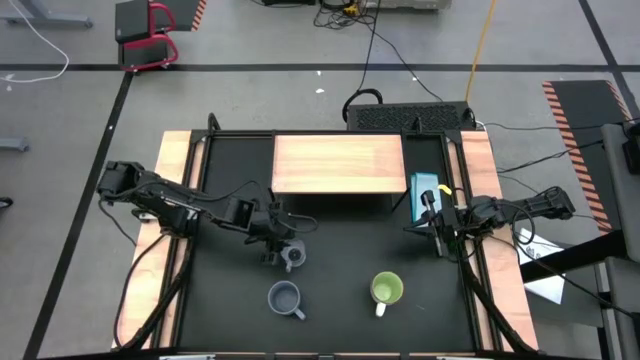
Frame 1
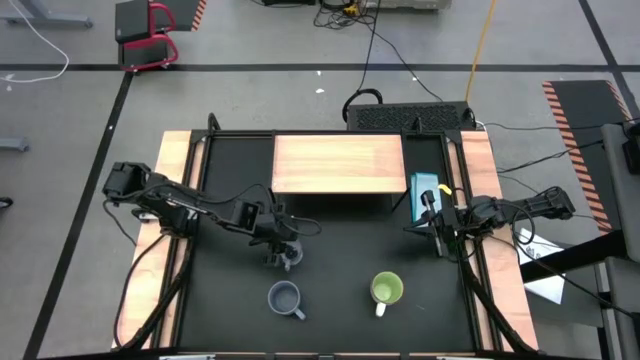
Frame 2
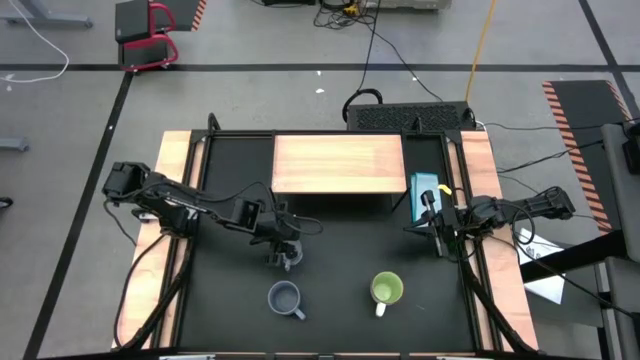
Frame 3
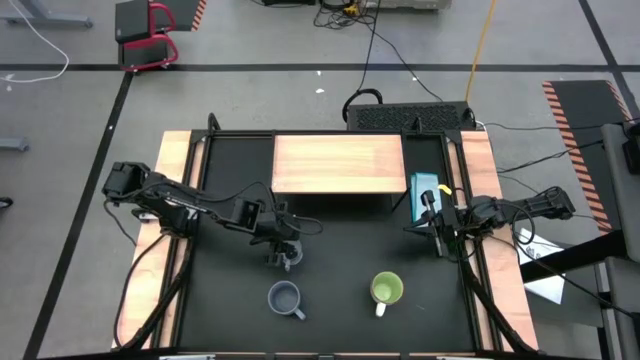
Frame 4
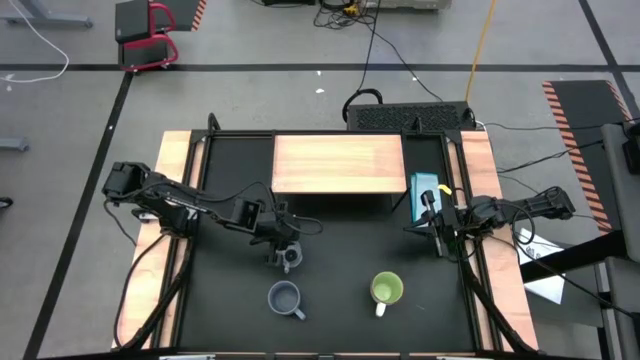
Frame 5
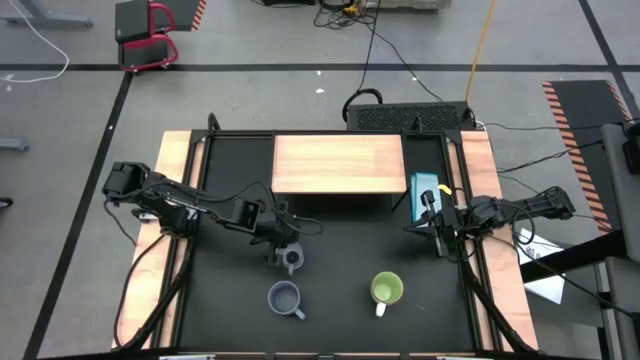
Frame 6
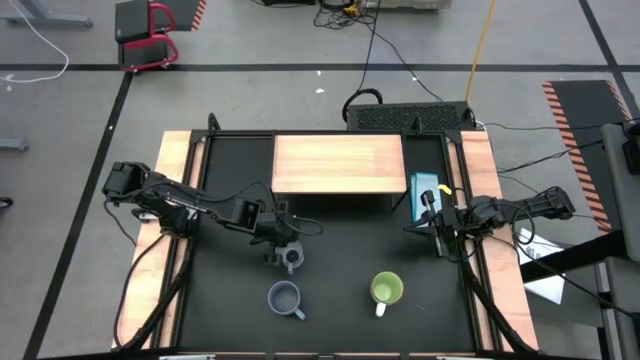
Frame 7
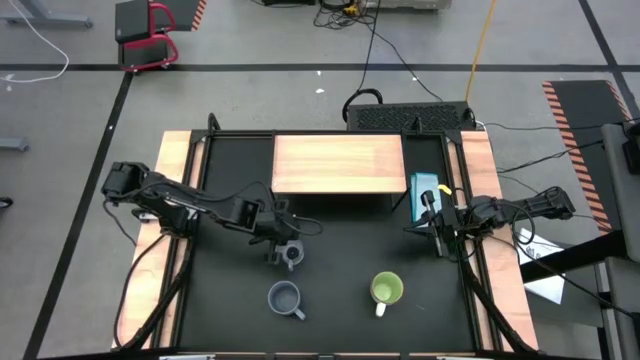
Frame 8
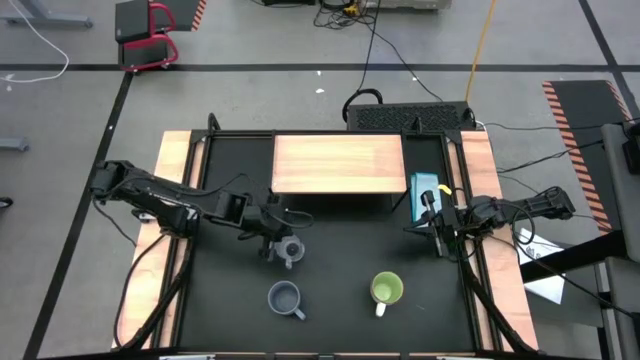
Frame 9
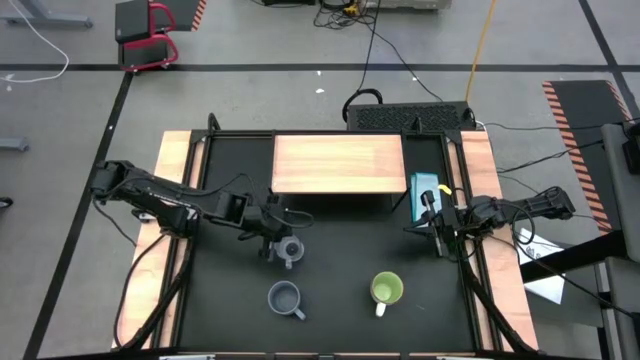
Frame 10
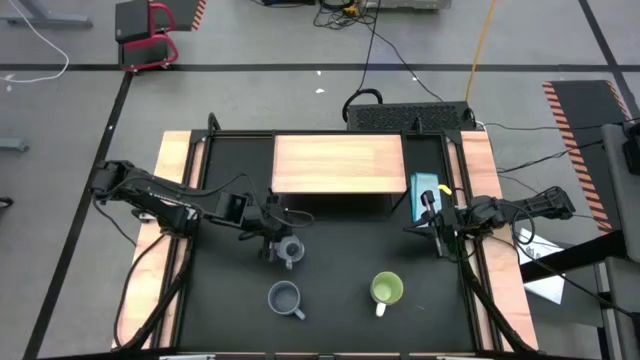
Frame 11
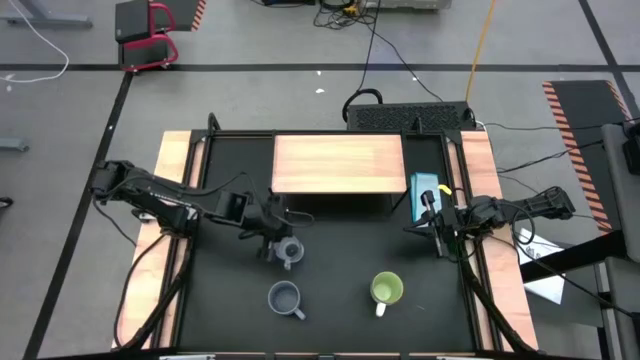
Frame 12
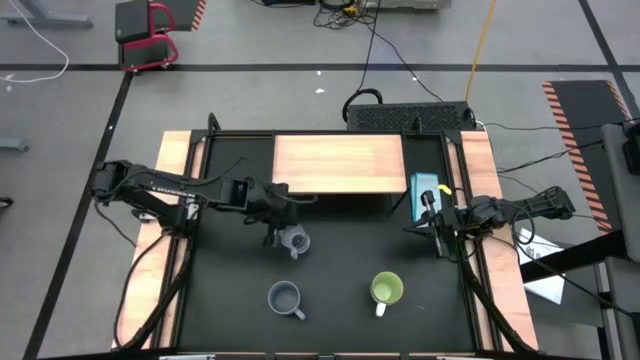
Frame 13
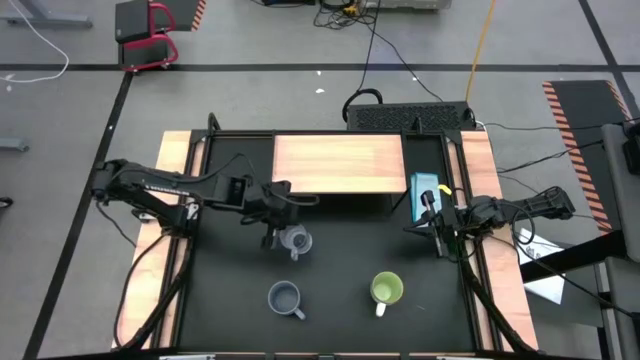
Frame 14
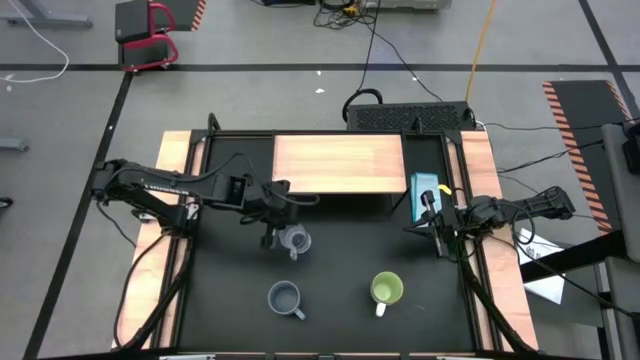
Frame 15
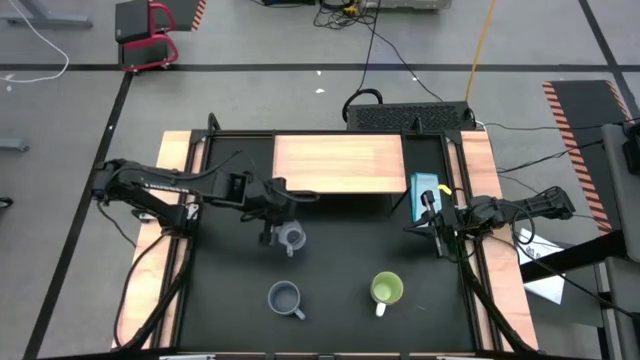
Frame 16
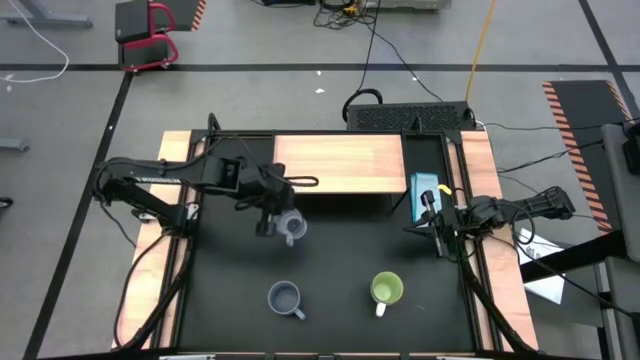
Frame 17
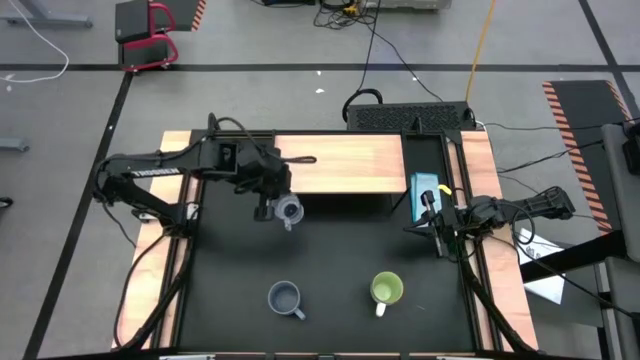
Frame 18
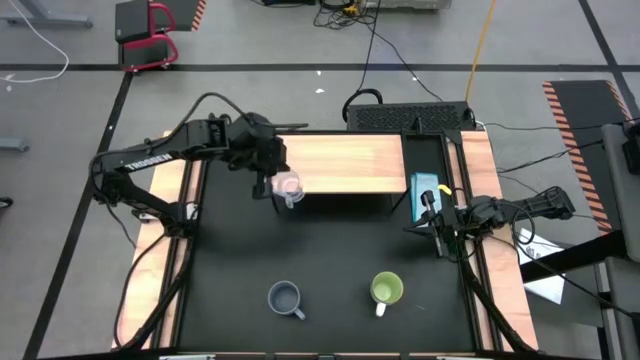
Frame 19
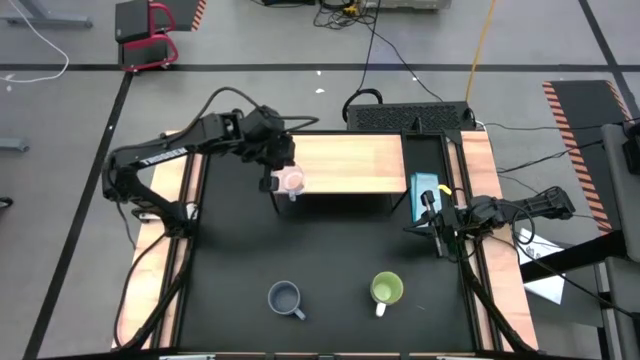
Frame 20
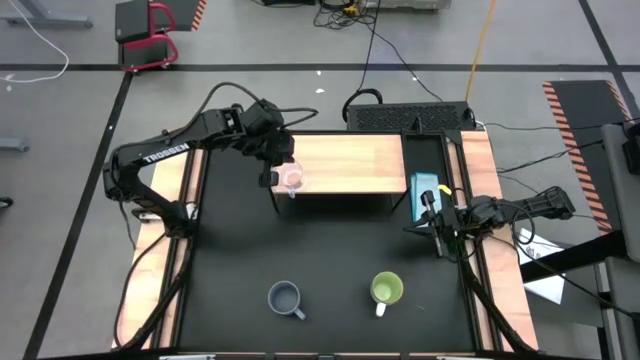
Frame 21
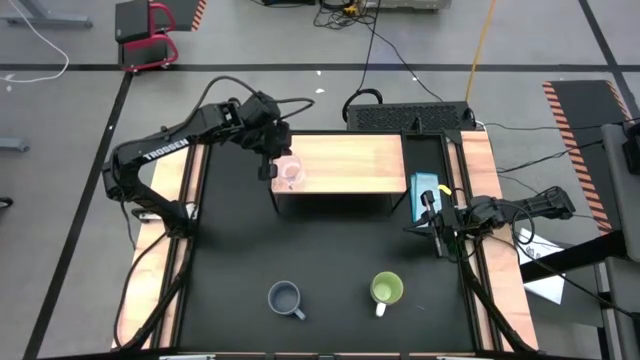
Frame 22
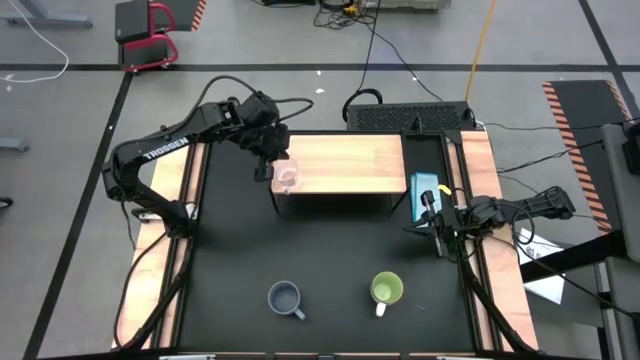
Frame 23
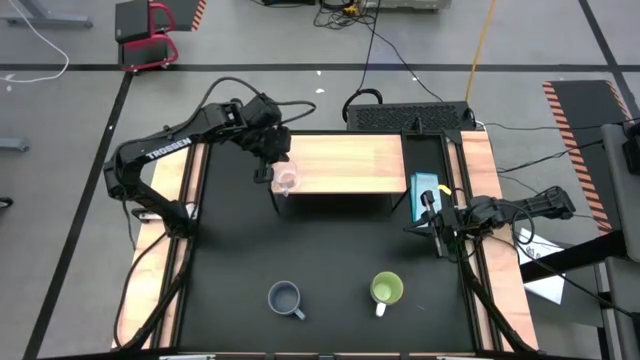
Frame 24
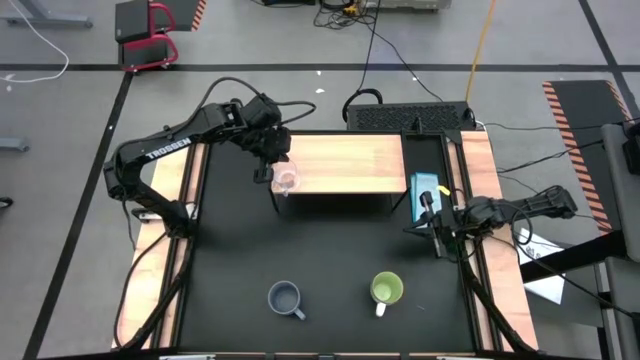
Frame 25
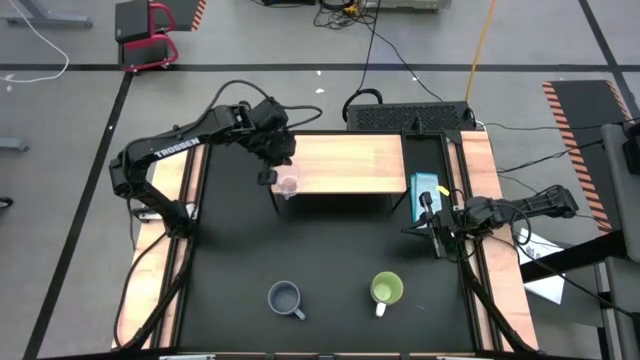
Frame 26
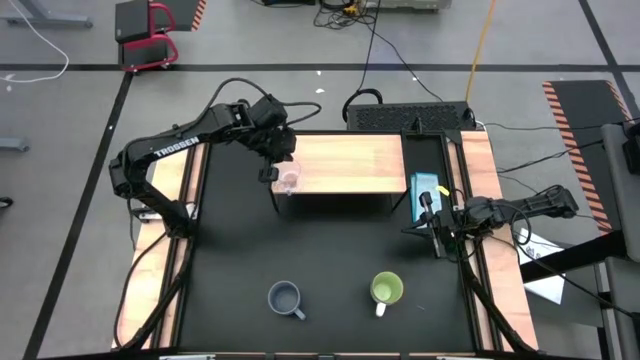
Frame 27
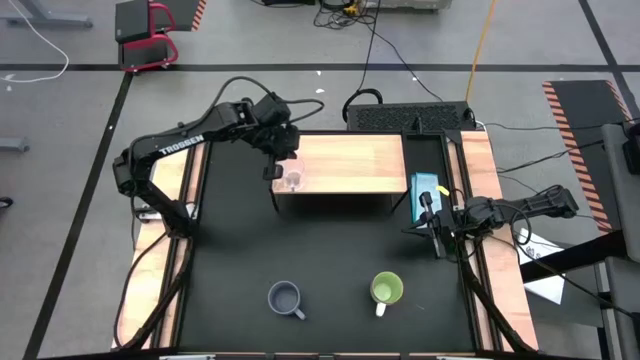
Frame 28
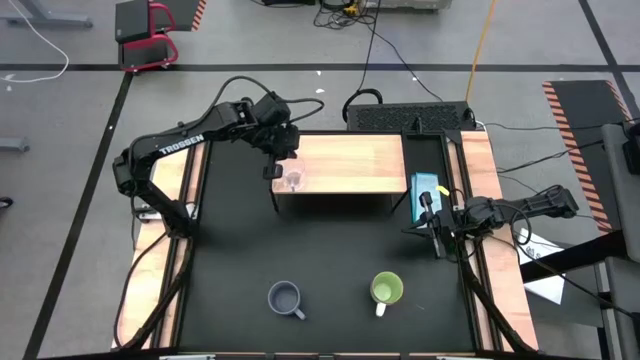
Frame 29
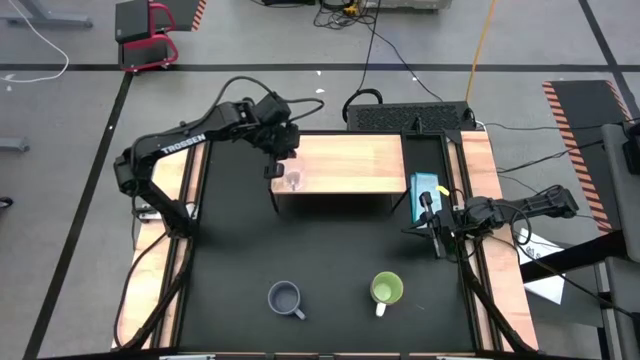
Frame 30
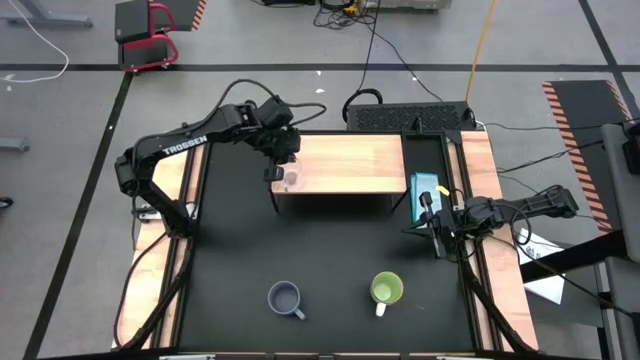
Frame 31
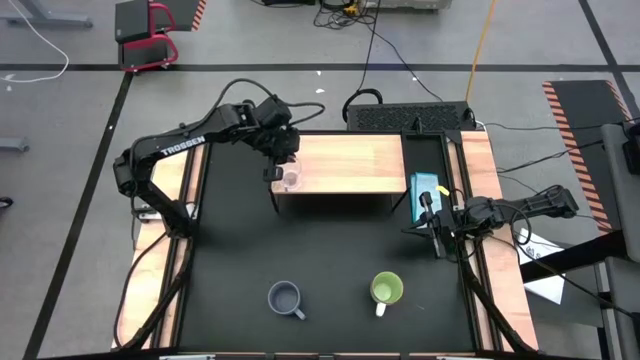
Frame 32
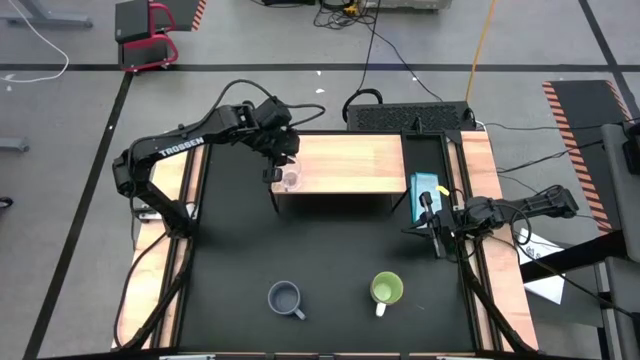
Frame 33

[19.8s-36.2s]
Task: Stack small to large cups/mugs on shelf
Put the transparent mug on the shelf

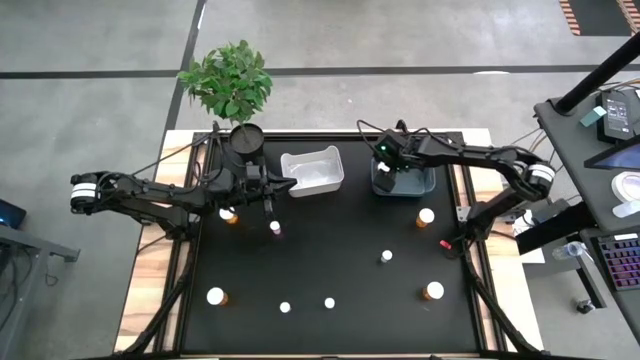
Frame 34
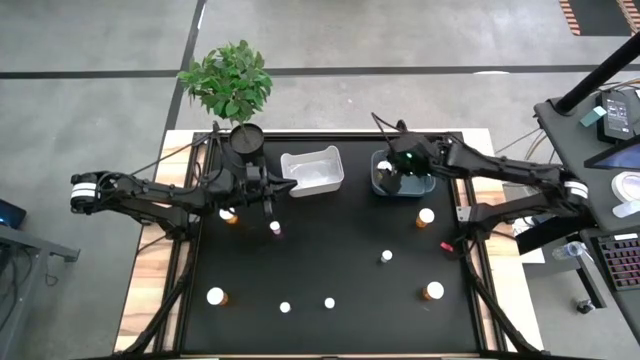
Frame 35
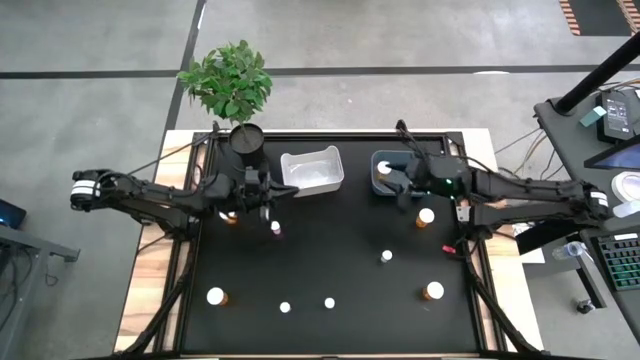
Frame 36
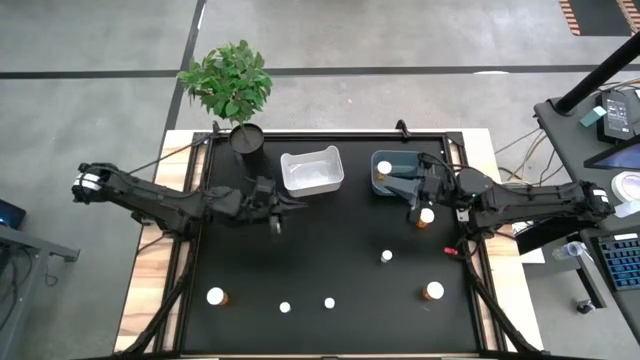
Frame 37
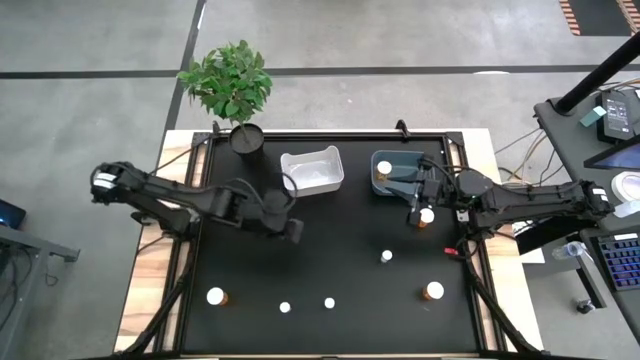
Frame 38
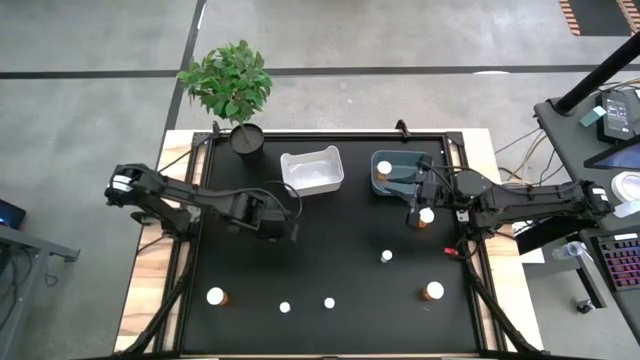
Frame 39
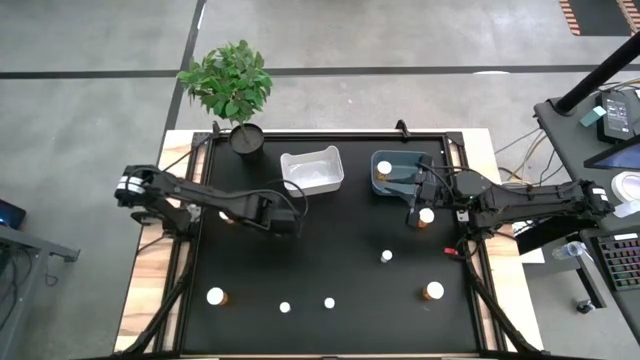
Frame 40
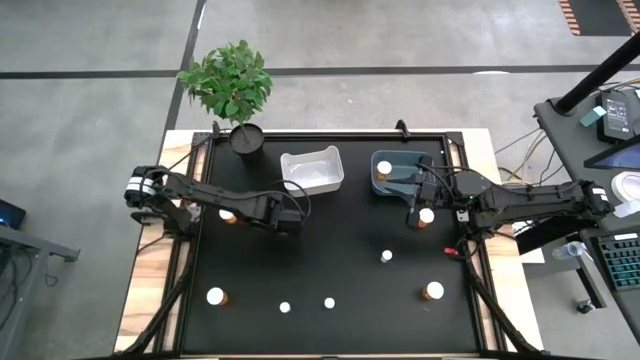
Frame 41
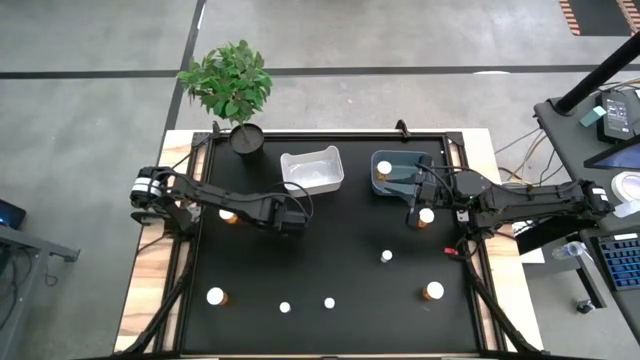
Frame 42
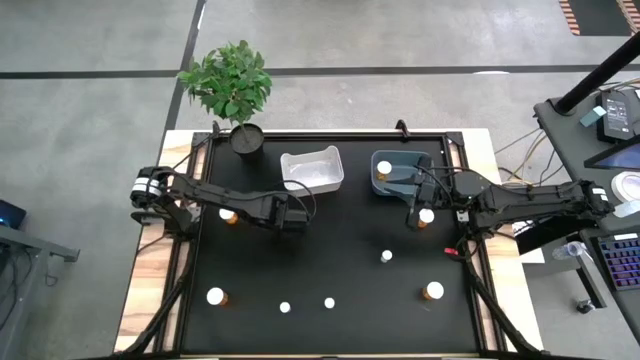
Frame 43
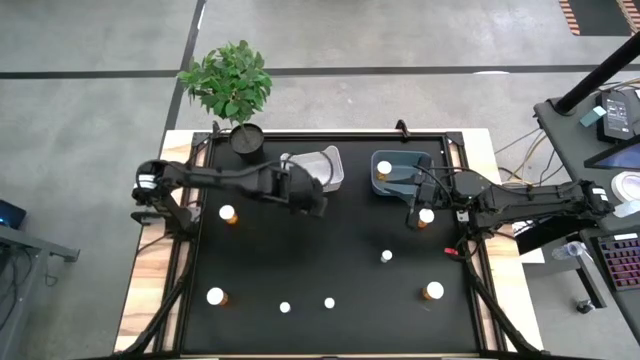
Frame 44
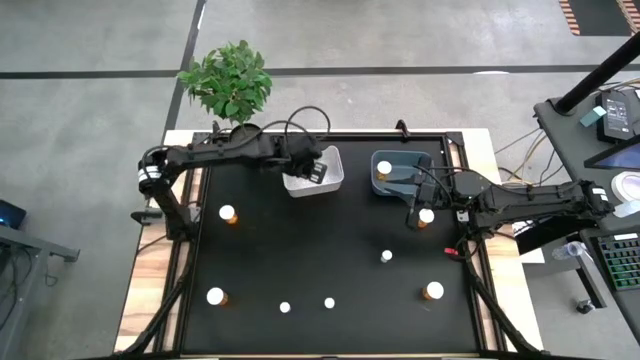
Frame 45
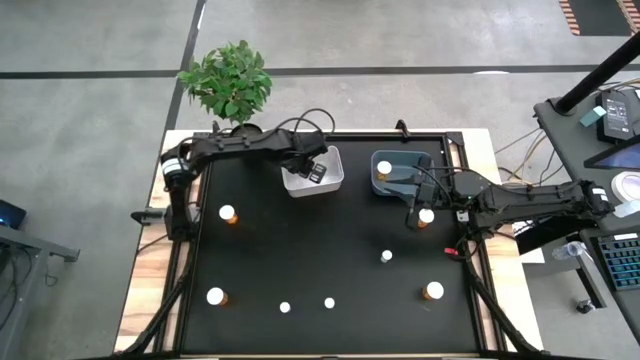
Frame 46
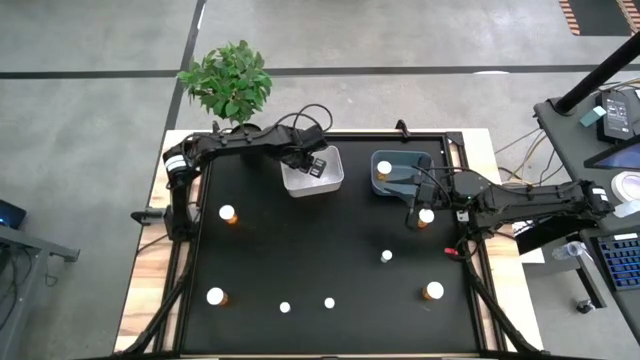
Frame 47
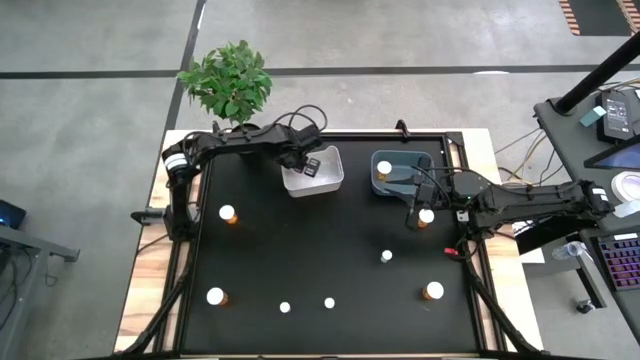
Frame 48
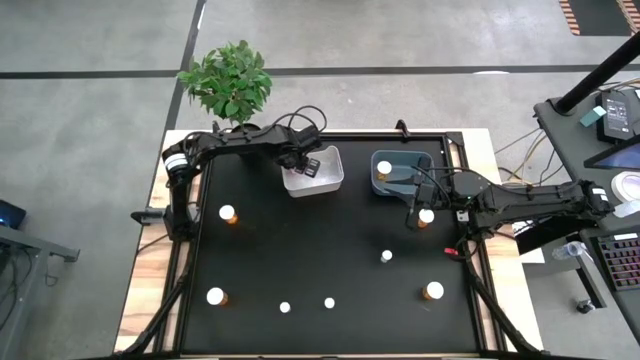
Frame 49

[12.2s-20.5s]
Task: Pick and place medicine bottles into bin by pill shape (circle, oval)
Put the pink tablet bottle into the white bin
